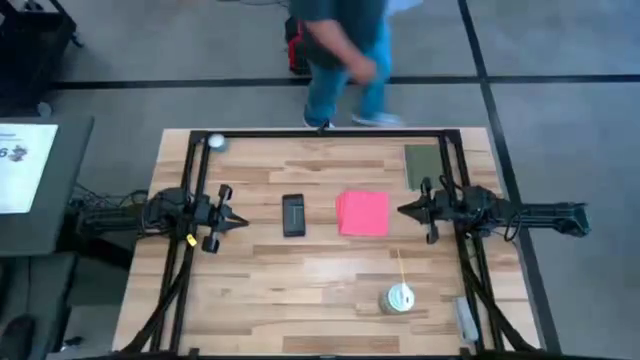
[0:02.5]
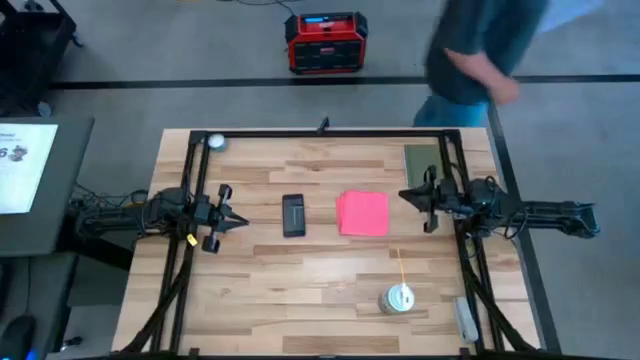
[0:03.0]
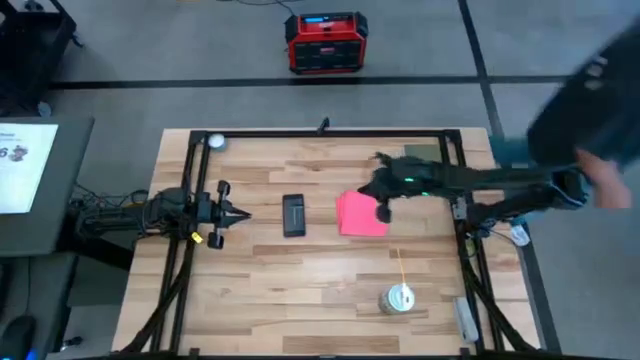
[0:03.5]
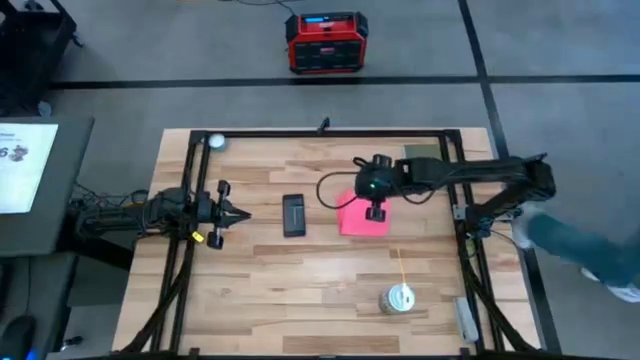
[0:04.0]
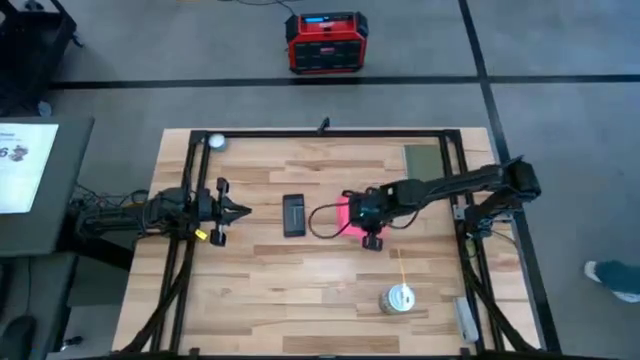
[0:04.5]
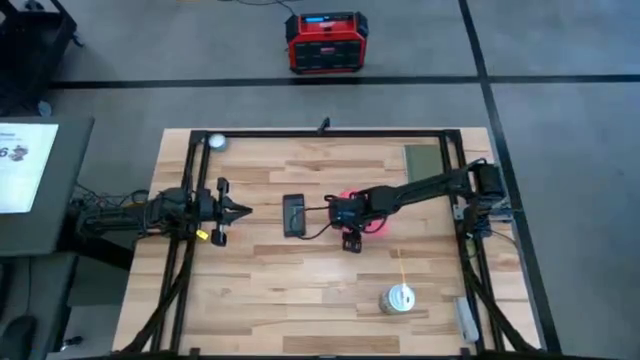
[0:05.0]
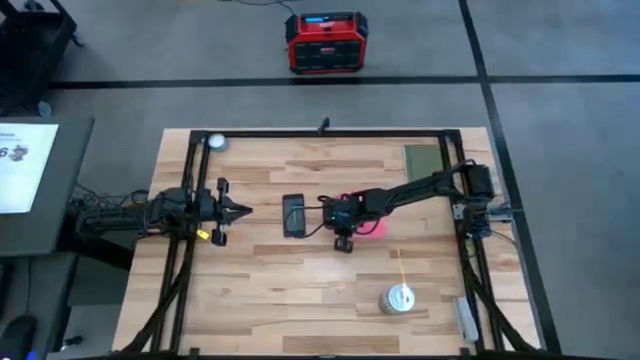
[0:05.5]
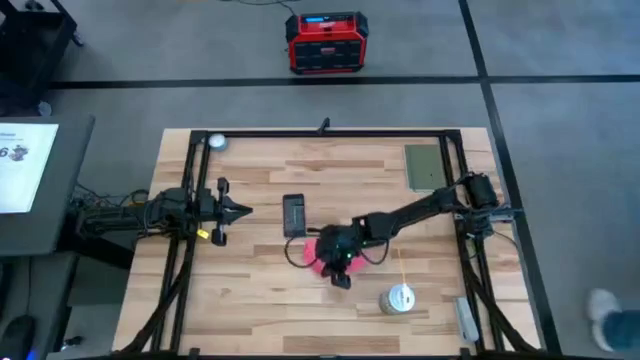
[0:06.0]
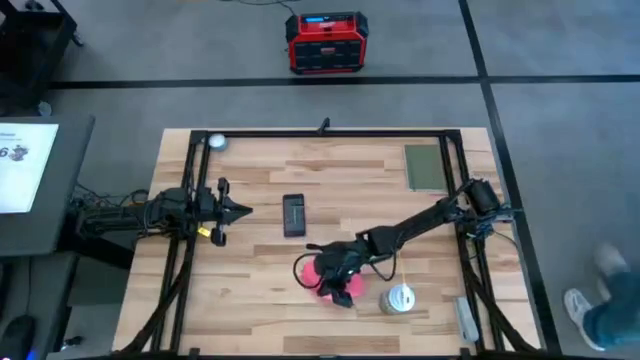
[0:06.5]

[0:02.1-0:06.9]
Task: Apply microfiber cloth
Move the pink microfiber cloth to the bottom of the table

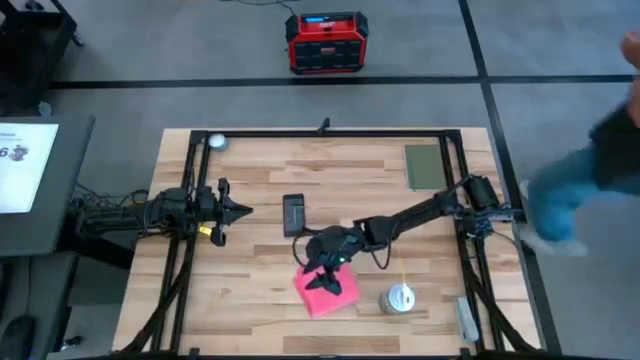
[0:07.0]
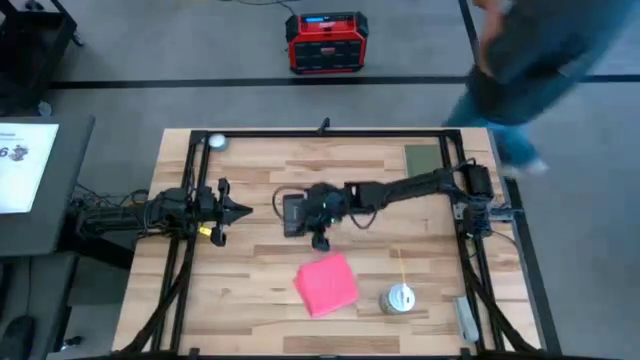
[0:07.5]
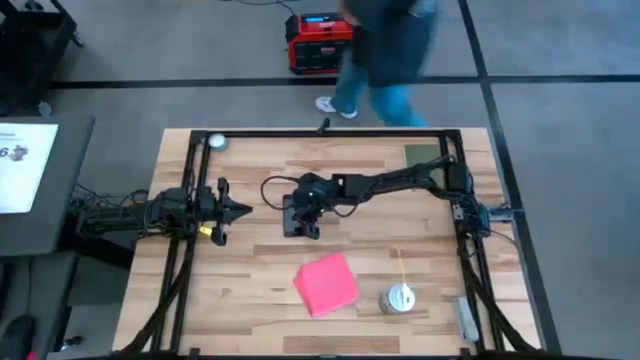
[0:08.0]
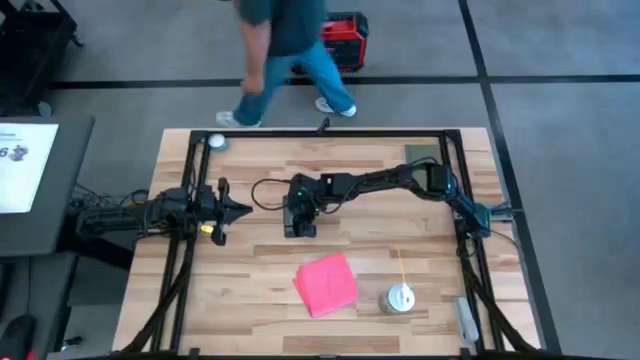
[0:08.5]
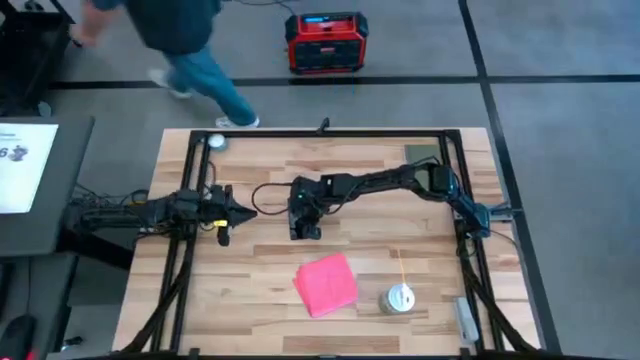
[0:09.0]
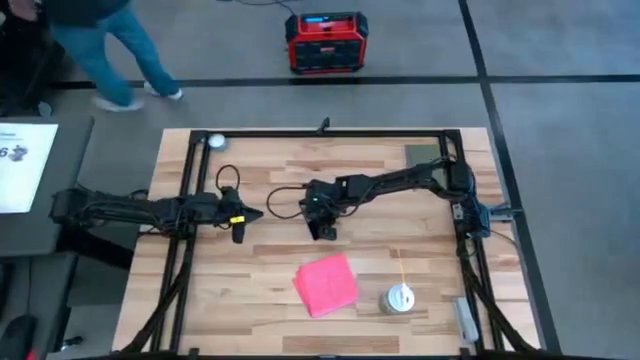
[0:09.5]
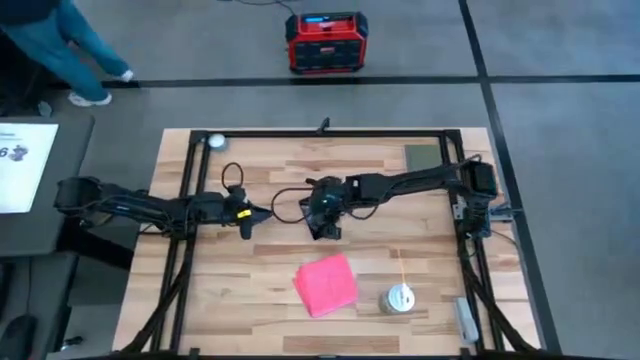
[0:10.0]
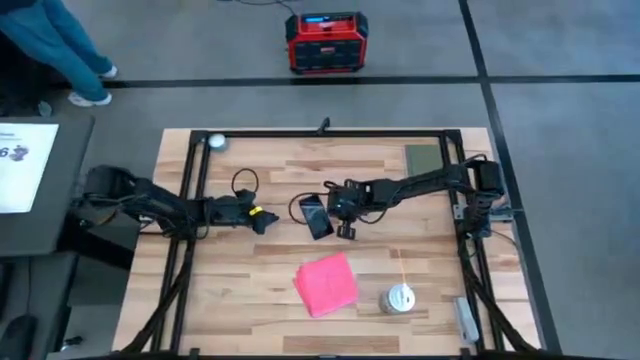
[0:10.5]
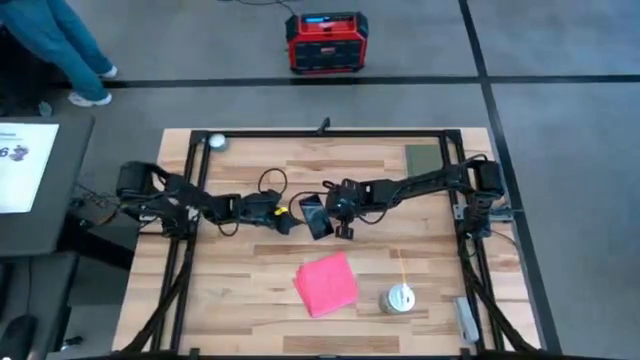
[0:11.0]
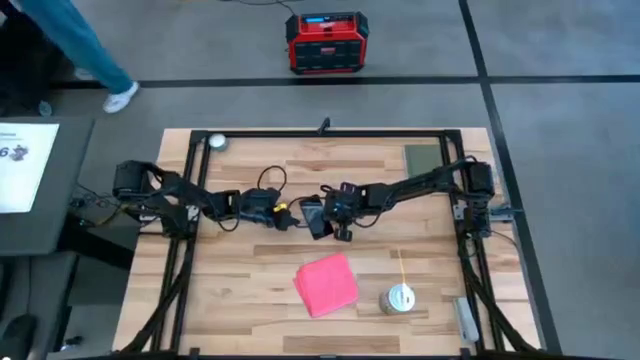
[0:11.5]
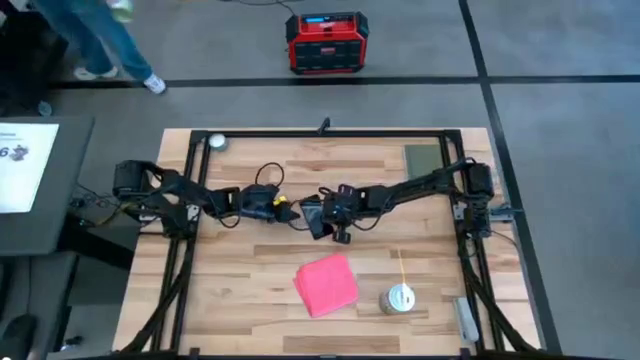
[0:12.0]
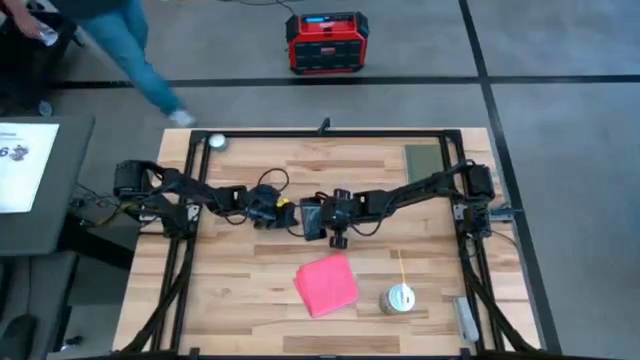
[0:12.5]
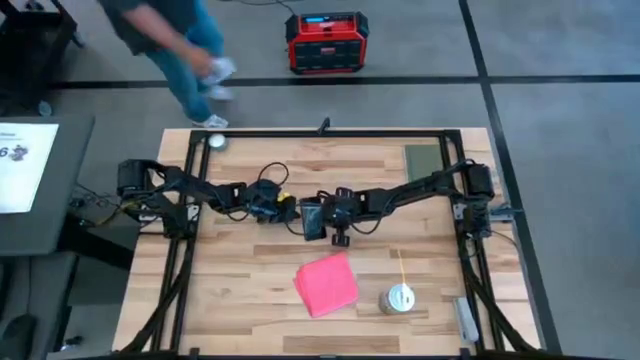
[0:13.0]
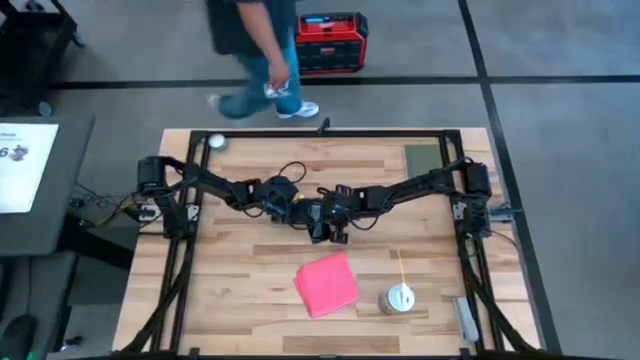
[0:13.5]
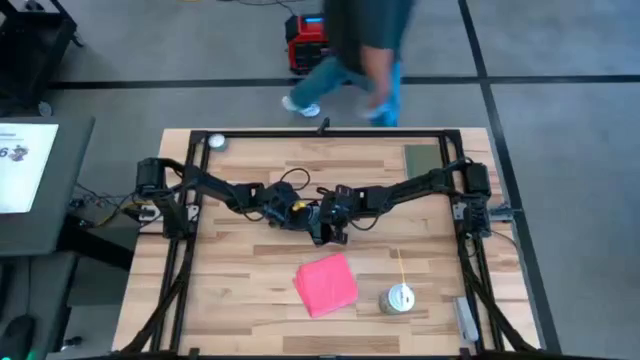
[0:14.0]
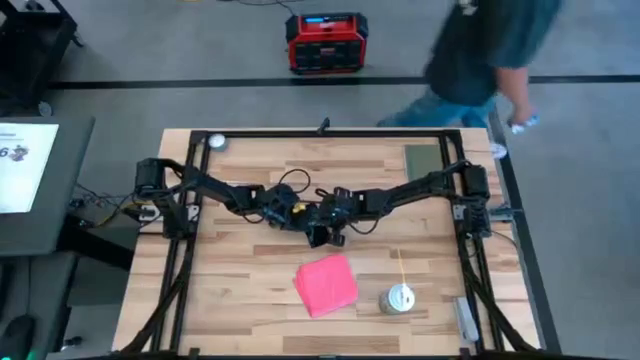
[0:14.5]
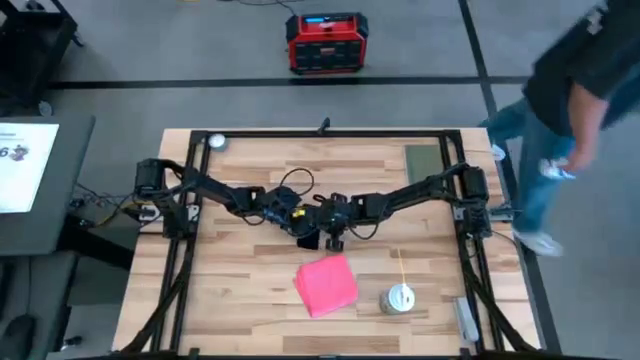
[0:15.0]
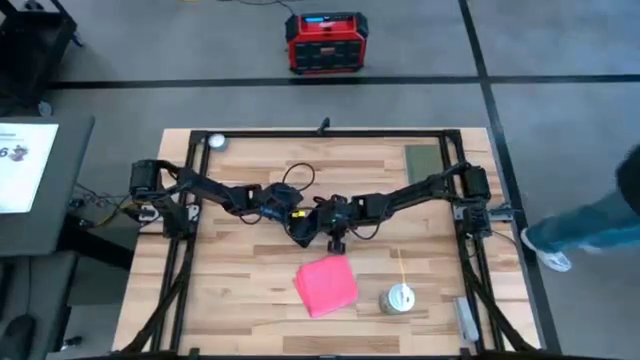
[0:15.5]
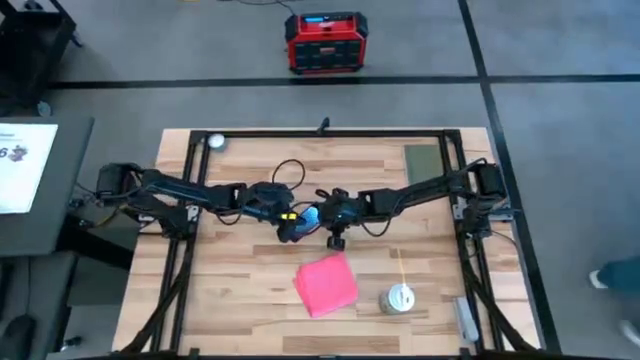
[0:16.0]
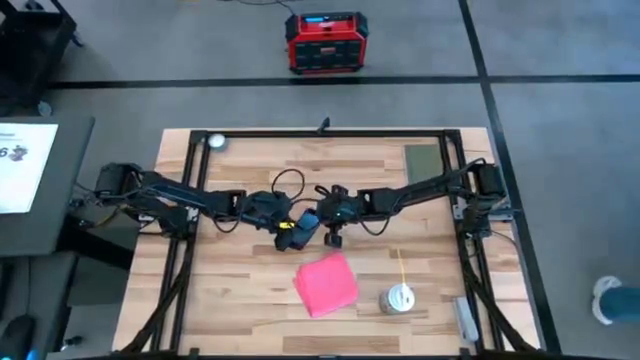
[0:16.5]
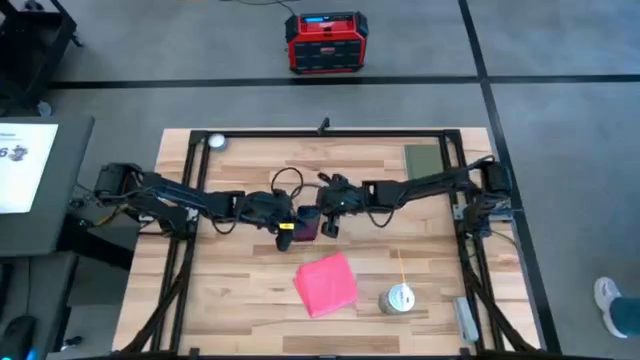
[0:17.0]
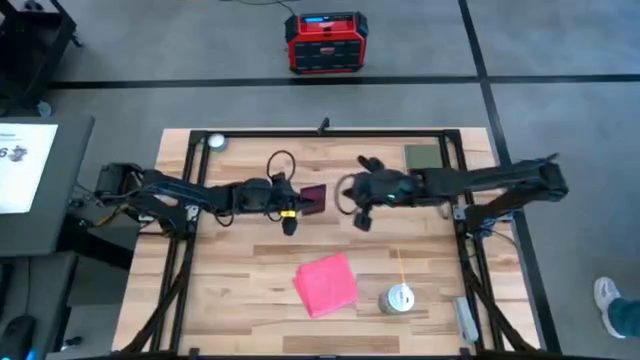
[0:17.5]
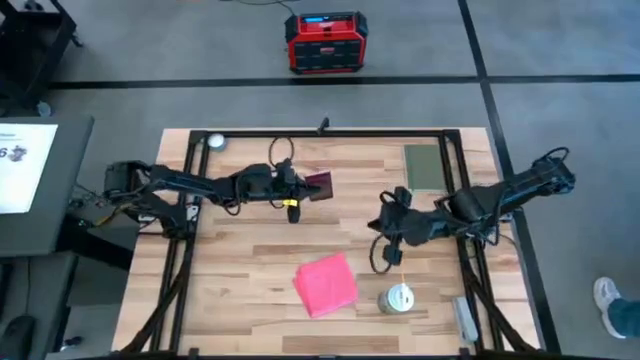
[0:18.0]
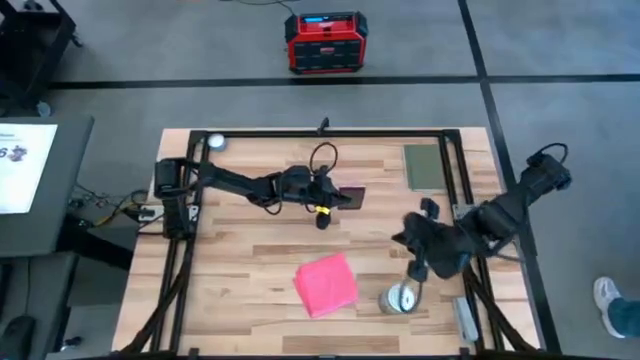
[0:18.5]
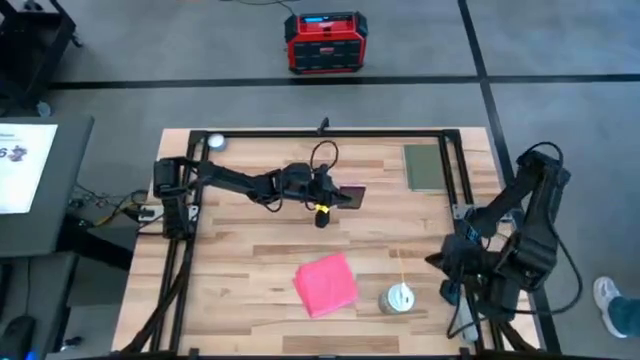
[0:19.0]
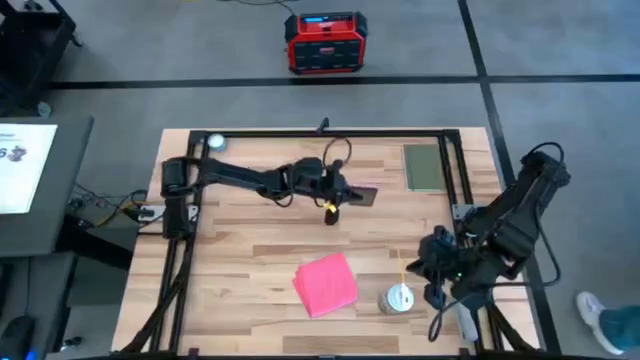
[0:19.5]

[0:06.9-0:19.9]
Spray the front of the pink phone using the spray bottle

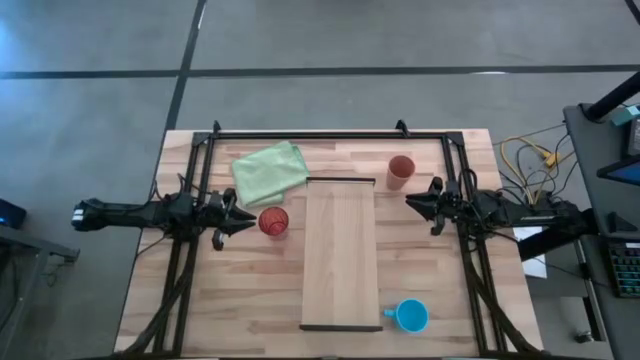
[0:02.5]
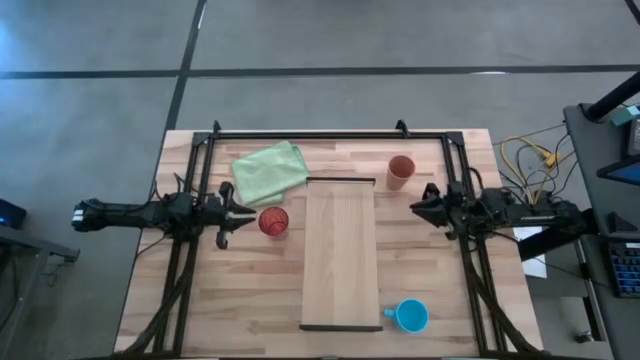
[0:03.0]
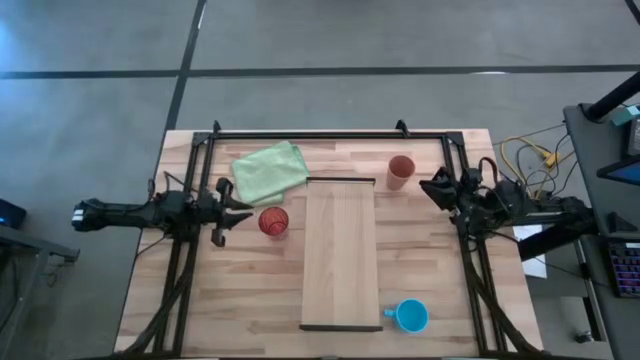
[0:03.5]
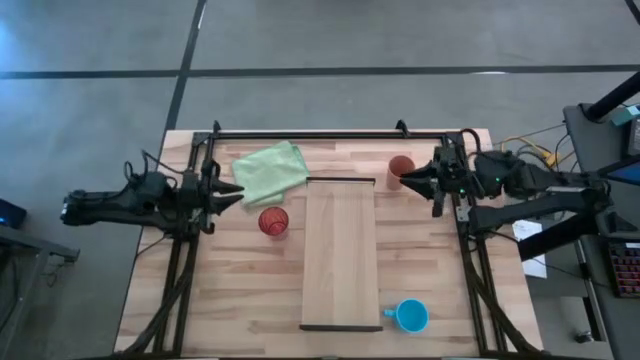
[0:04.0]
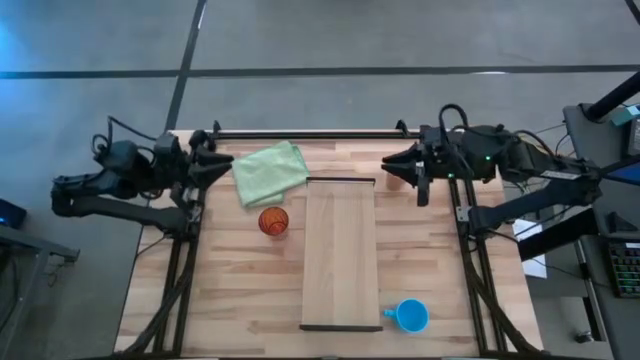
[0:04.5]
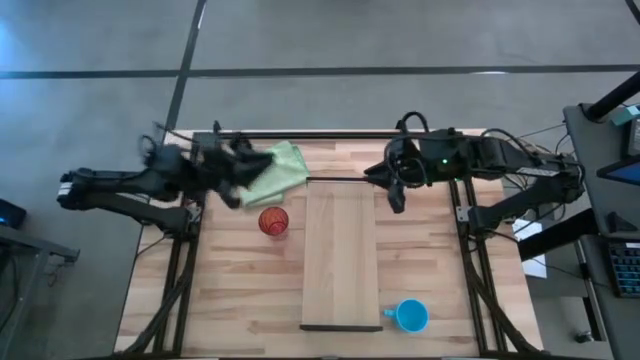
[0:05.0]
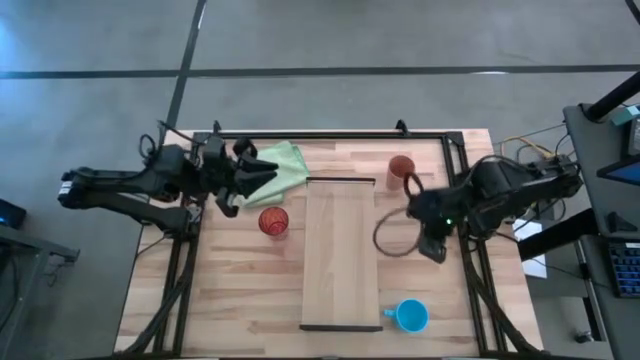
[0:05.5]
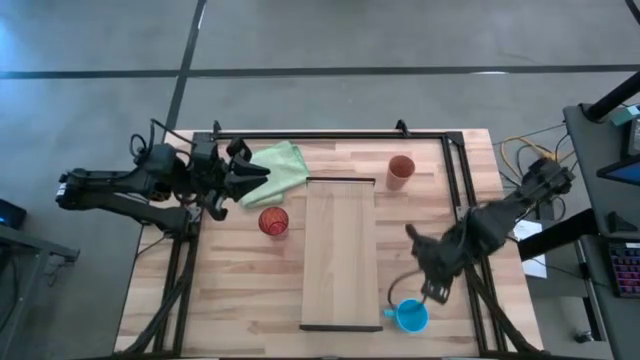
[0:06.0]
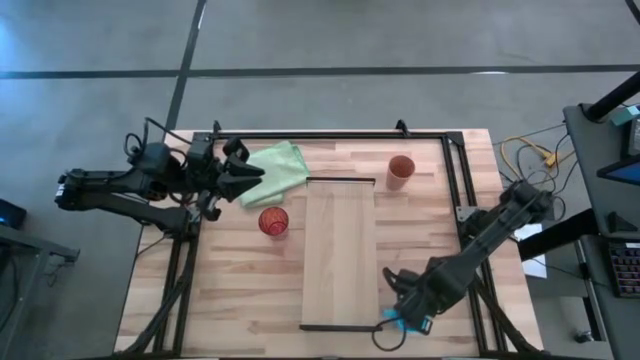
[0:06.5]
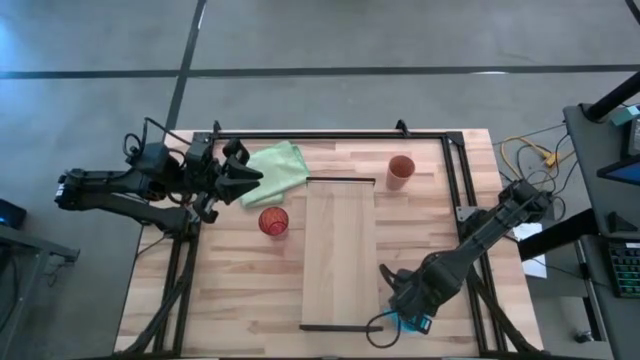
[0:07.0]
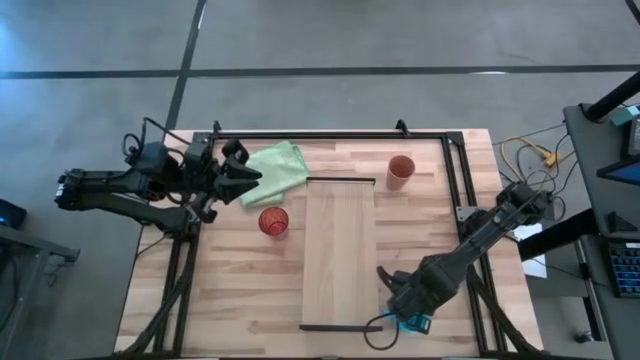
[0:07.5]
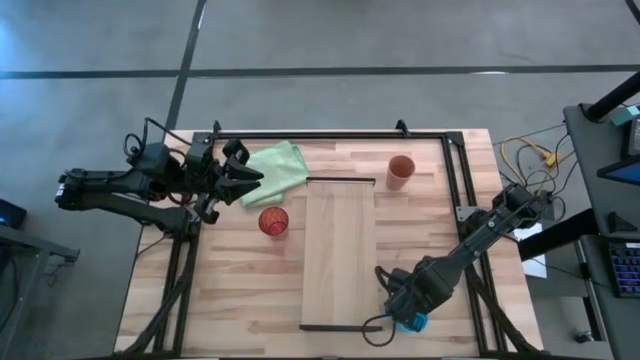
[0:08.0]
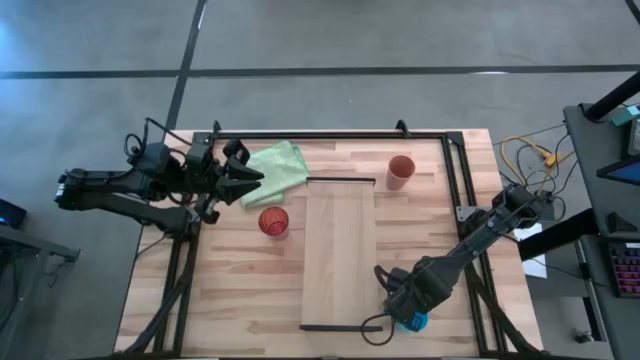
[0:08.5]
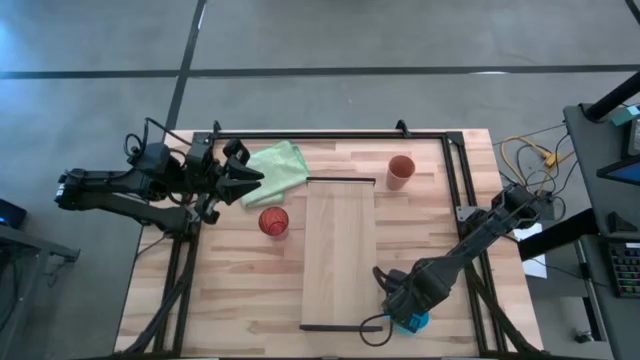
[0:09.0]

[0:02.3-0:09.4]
Task: Stack small to large cups/mugs on shelf
Put the blue mug on the shelf
